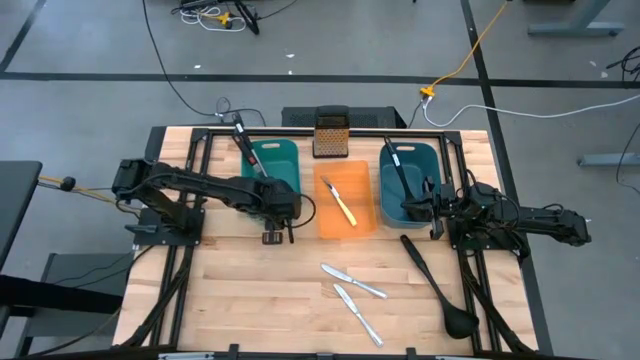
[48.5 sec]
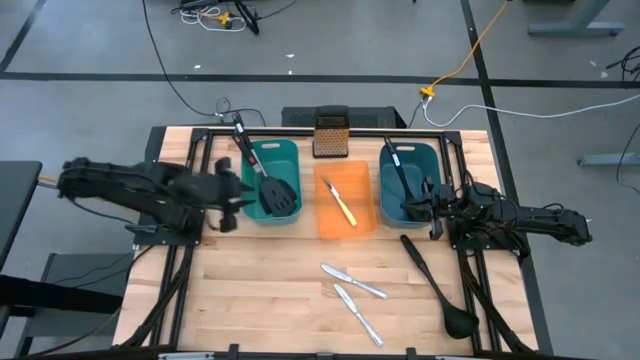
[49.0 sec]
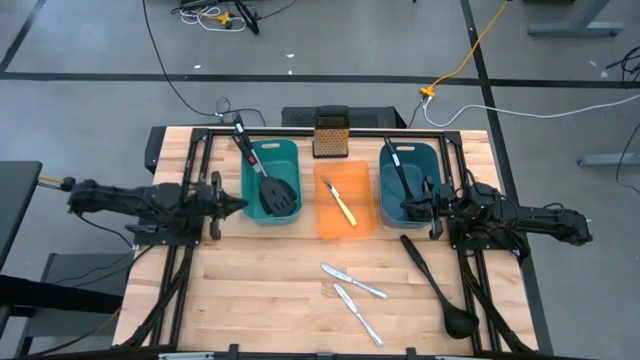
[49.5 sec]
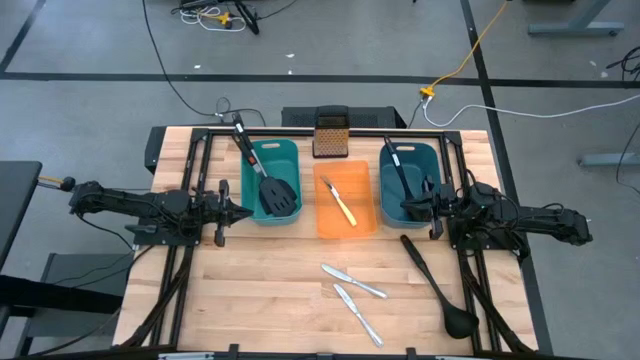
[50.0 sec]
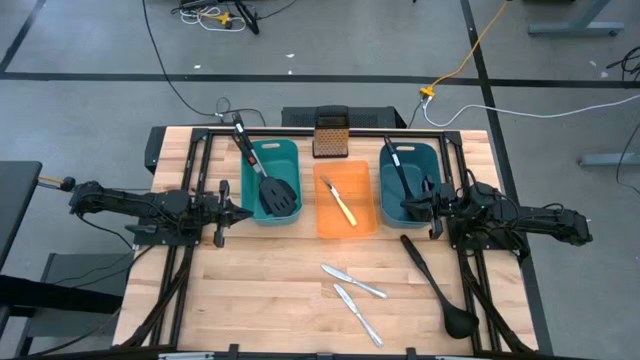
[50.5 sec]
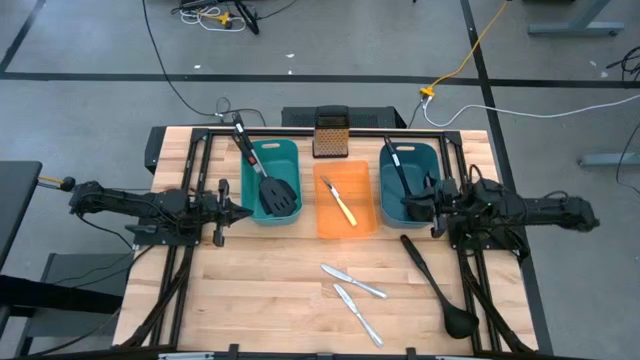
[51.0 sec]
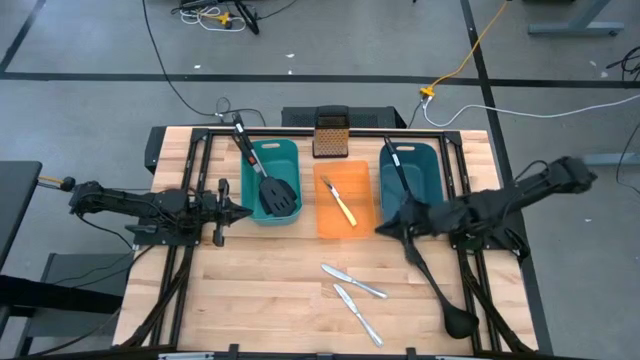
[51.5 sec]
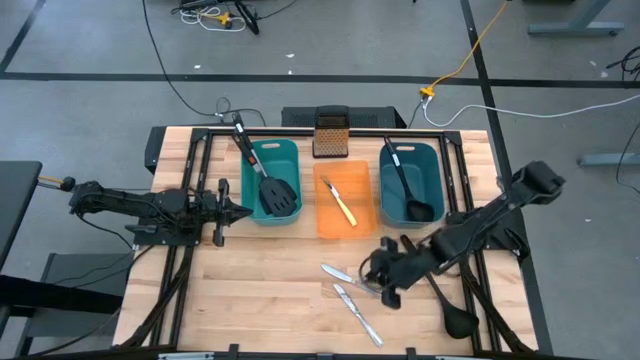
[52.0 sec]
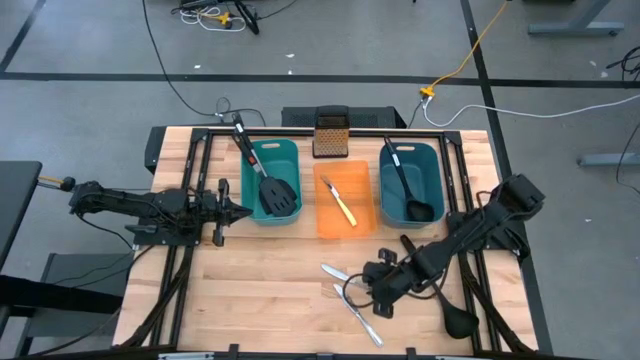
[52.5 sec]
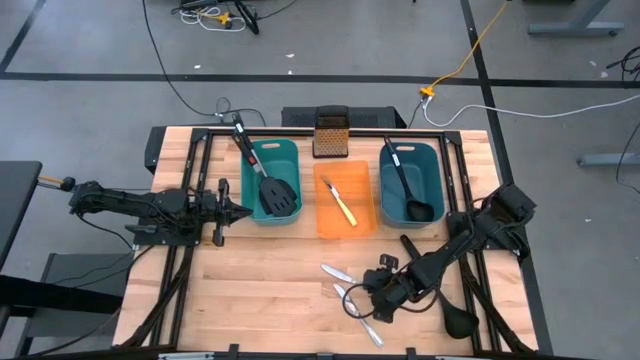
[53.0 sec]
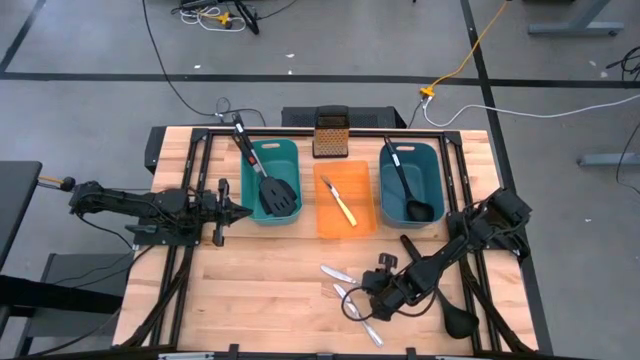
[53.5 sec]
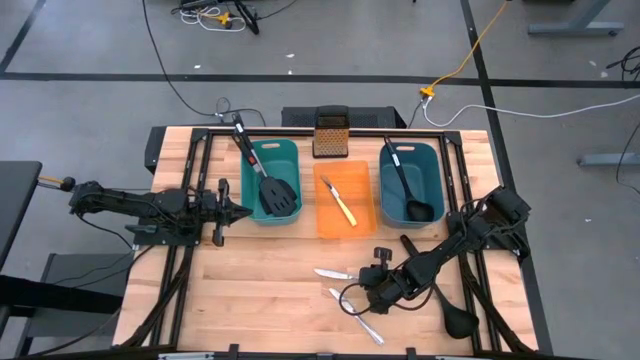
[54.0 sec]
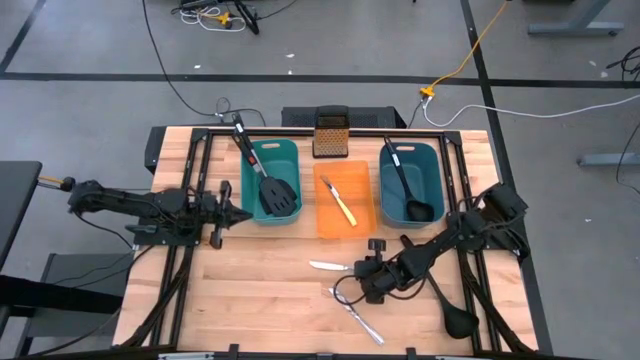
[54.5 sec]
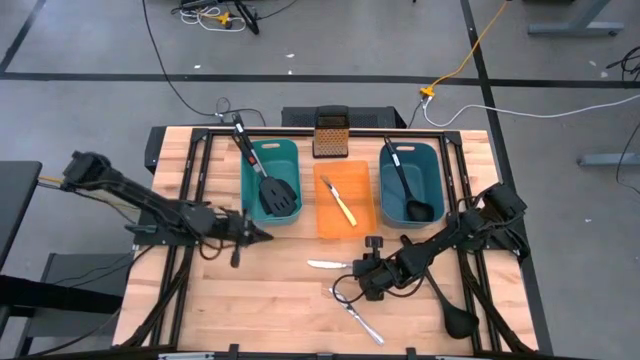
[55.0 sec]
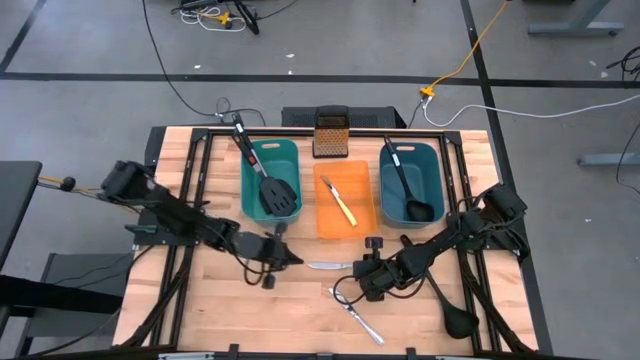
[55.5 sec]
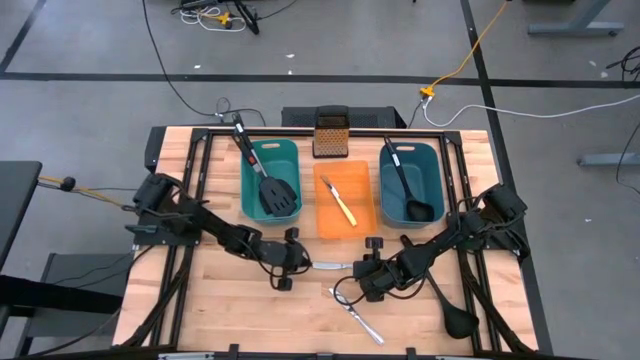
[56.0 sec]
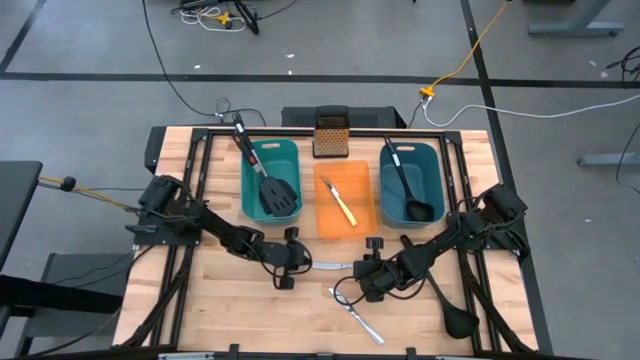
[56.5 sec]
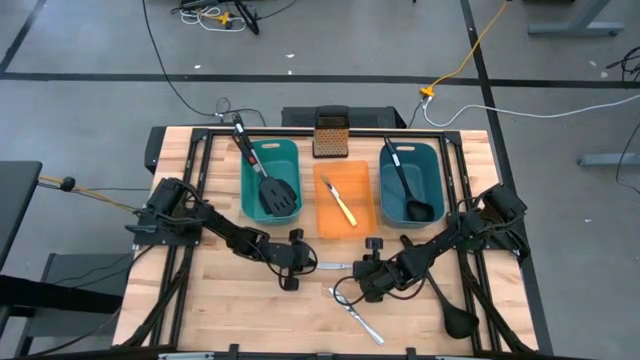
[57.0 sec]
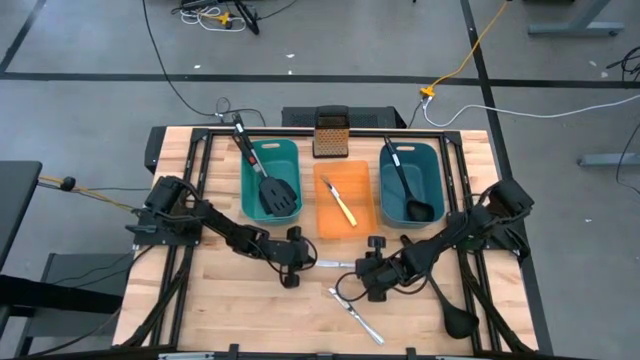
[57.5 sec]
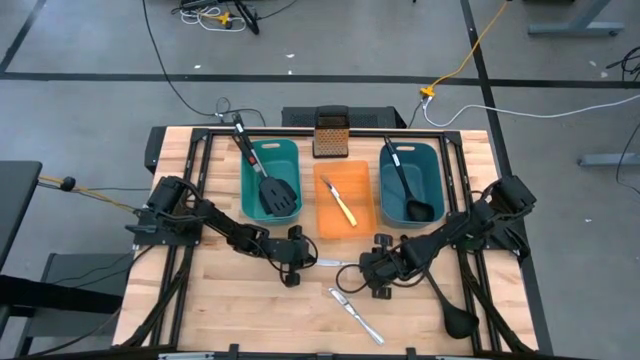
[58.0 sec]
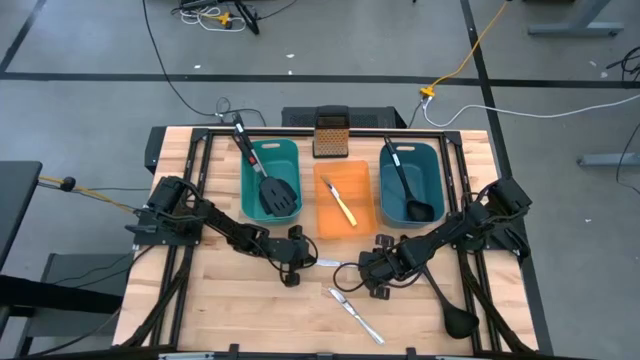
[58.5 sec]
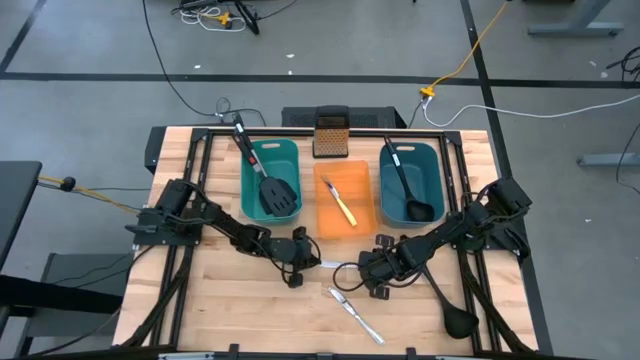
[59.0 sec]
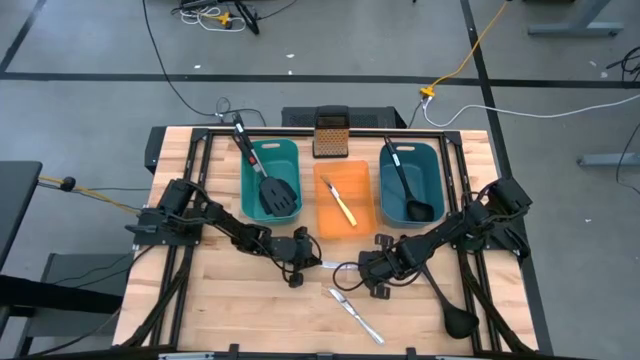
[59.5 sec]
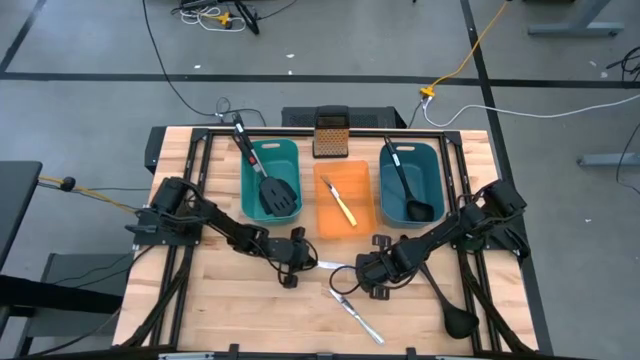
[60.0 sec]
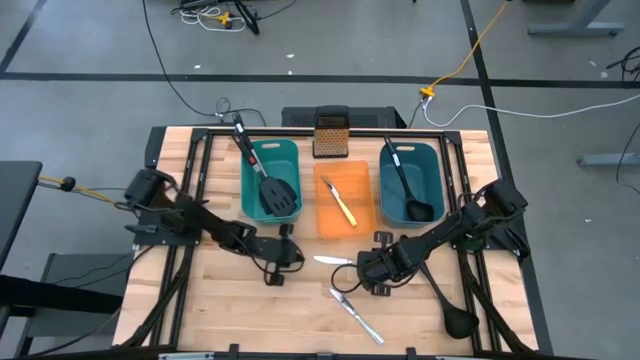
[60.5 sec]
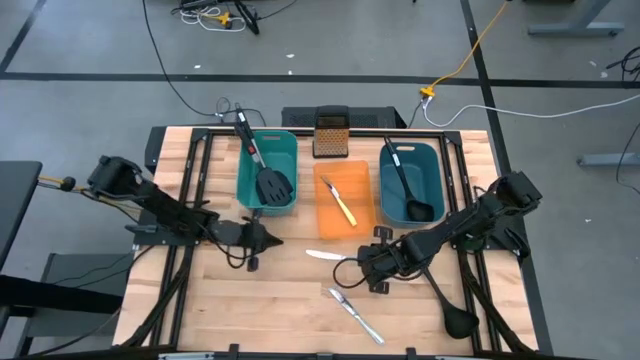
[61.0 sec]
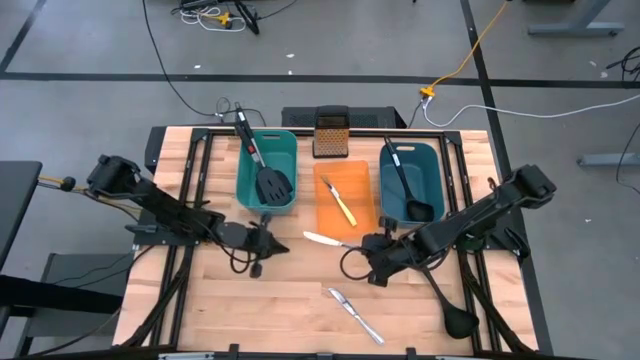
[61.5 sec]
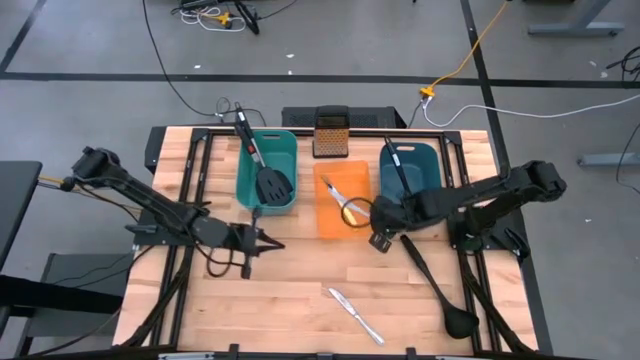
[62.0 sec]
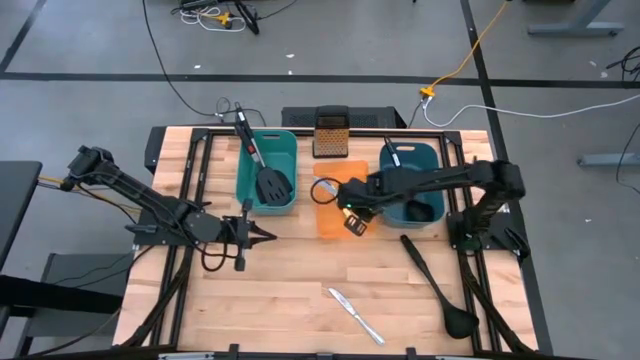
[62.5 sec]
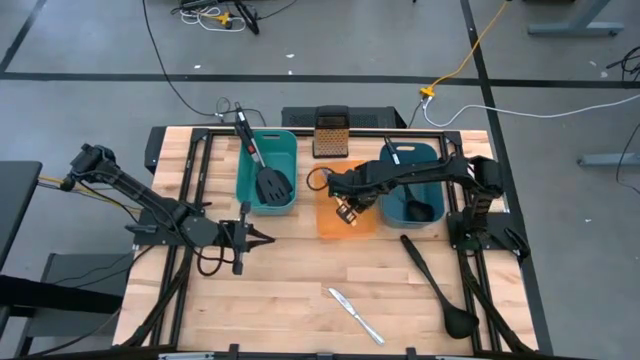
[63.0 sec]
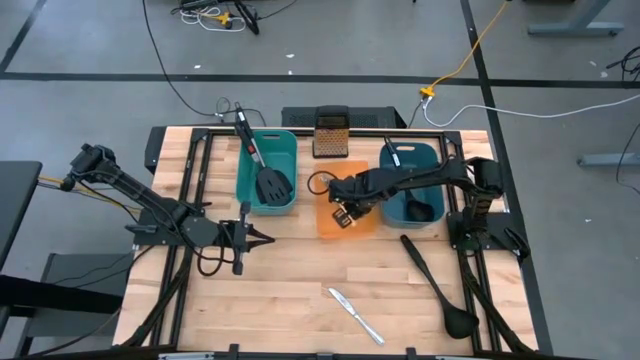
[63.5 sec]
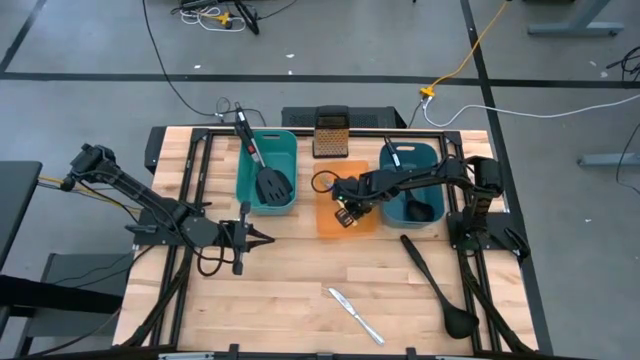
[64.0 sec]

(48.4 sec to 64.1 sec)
Task: Pick & Place Kitchen Items
Put the top silver table knife into the orange bin

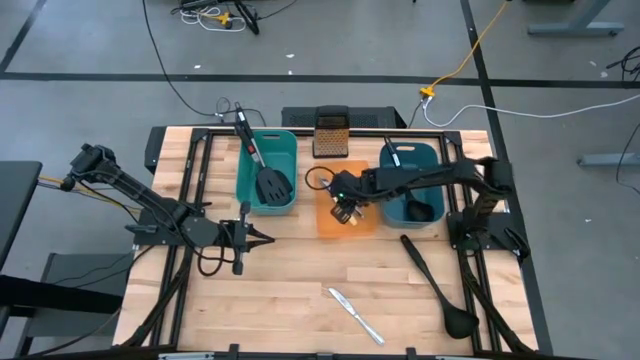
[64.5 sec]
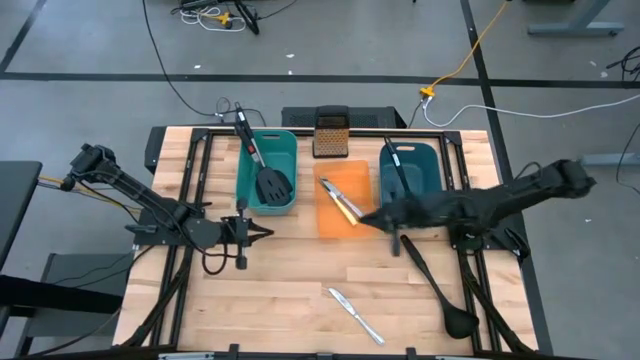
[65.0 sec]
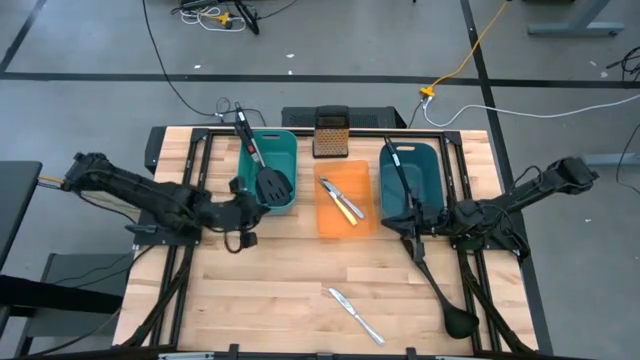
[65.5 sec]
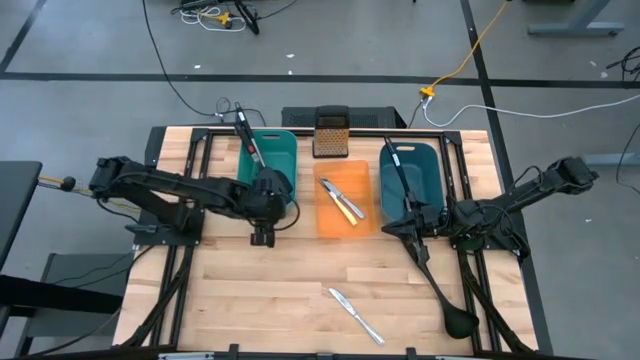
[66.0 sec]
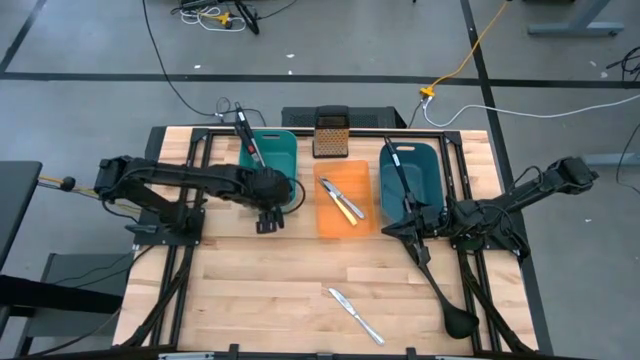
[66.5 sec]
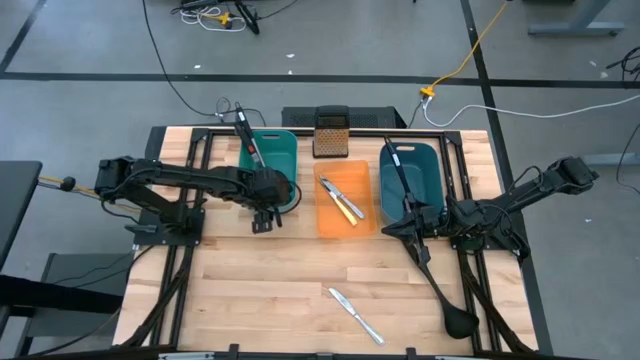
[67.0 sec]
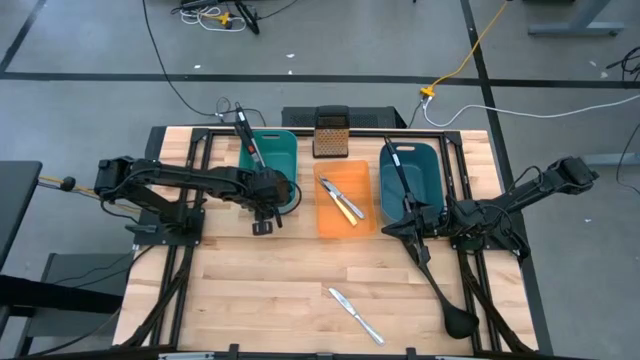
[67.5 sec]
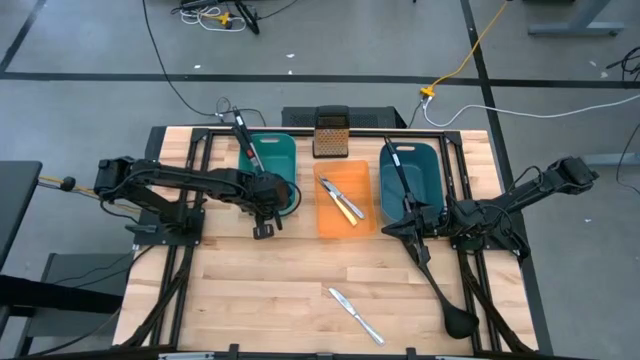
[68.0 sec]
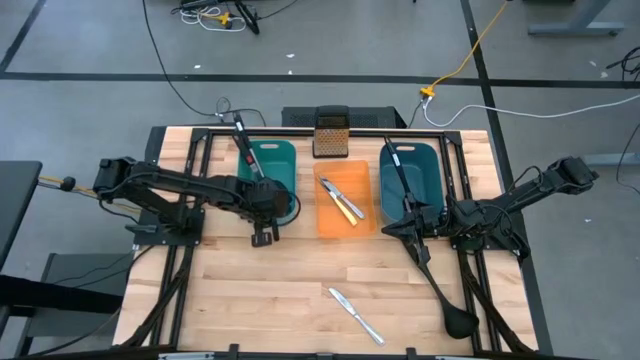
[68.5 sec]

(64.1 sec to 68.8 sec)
Adjust the green bin
